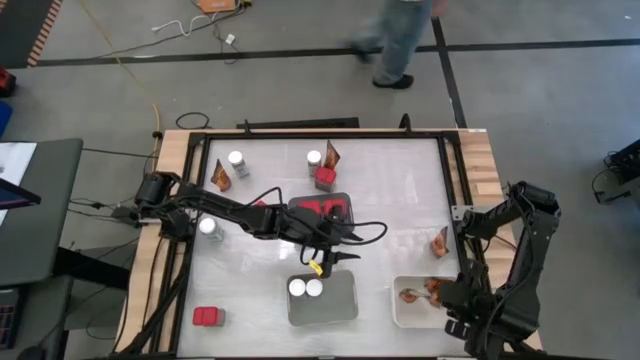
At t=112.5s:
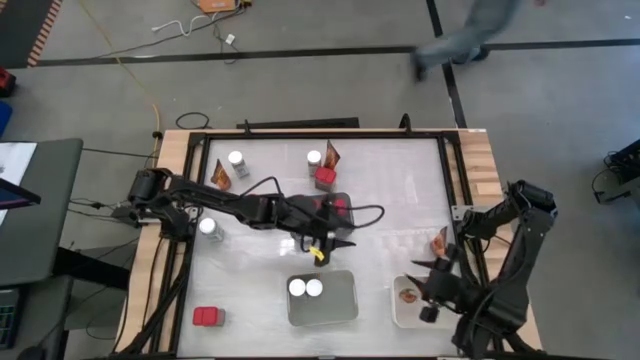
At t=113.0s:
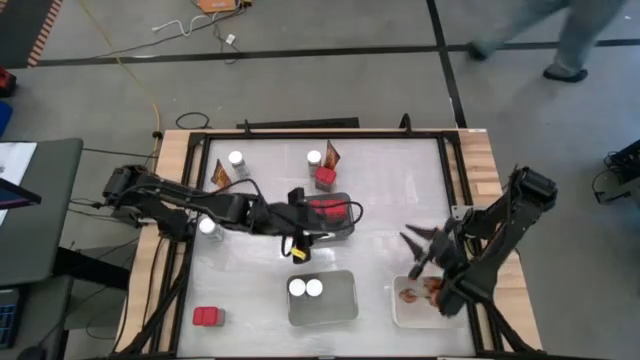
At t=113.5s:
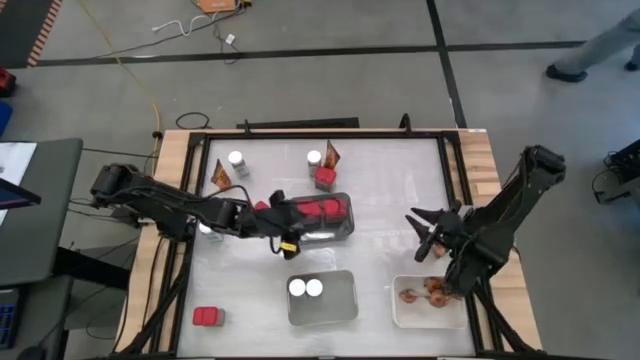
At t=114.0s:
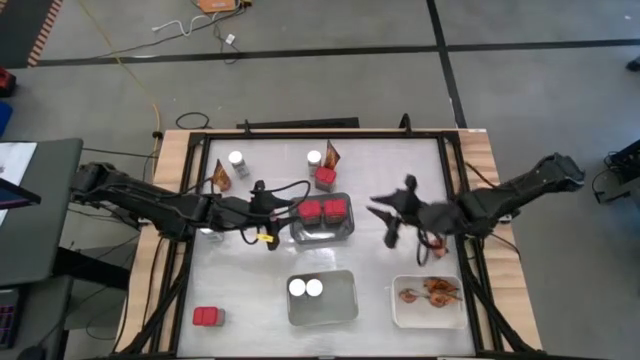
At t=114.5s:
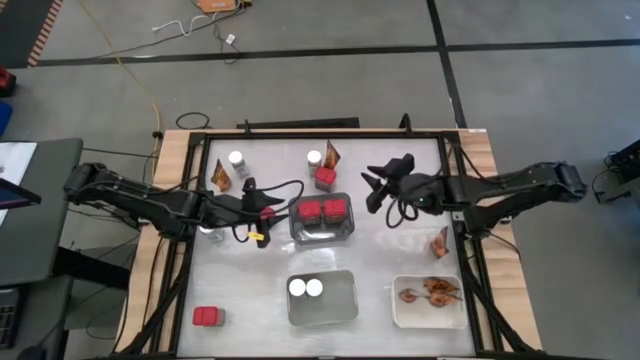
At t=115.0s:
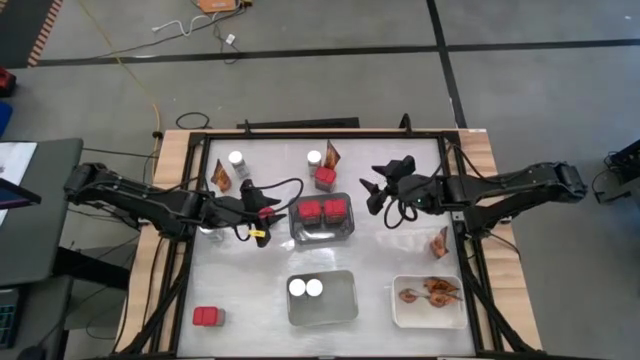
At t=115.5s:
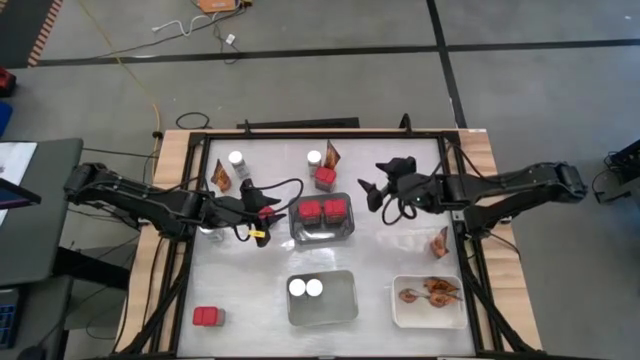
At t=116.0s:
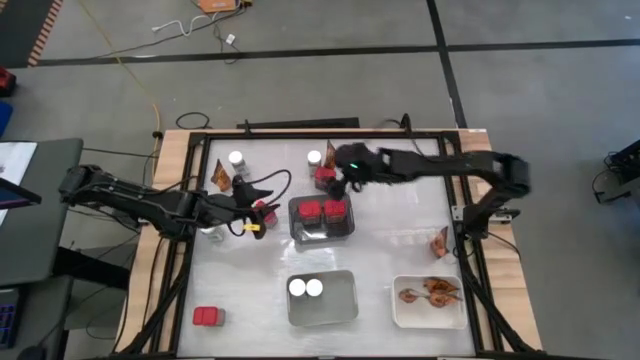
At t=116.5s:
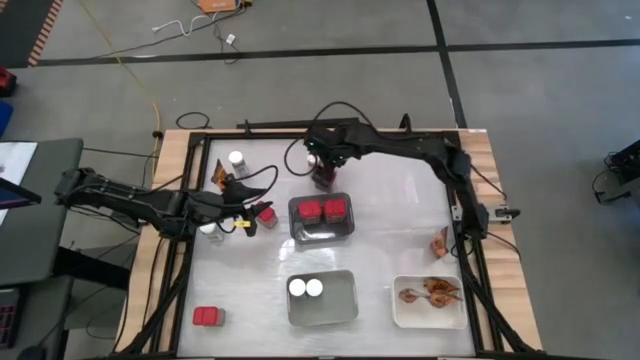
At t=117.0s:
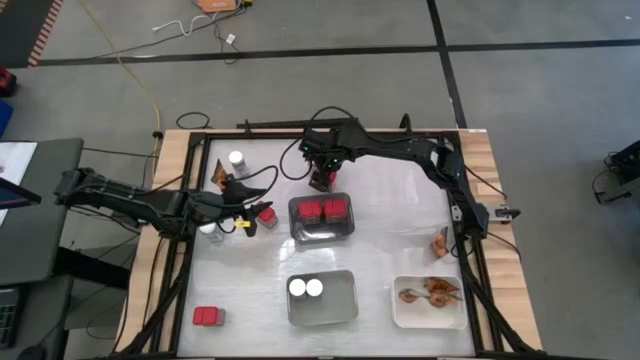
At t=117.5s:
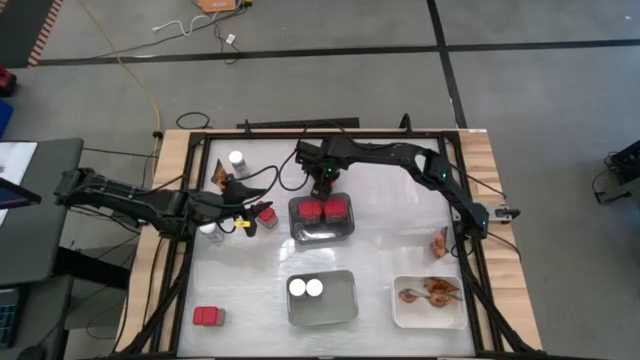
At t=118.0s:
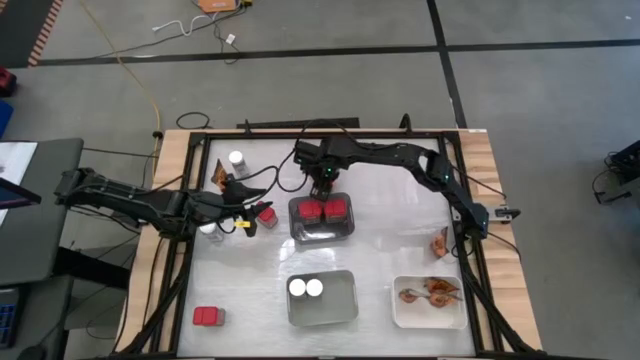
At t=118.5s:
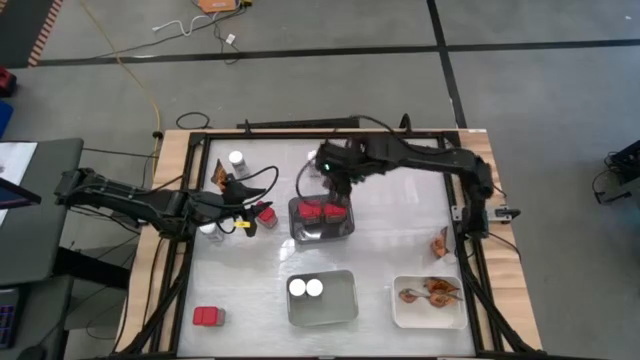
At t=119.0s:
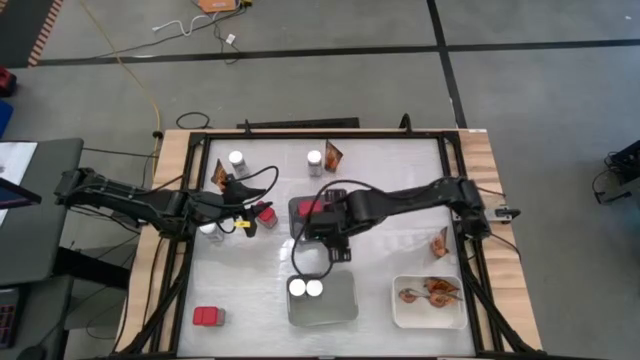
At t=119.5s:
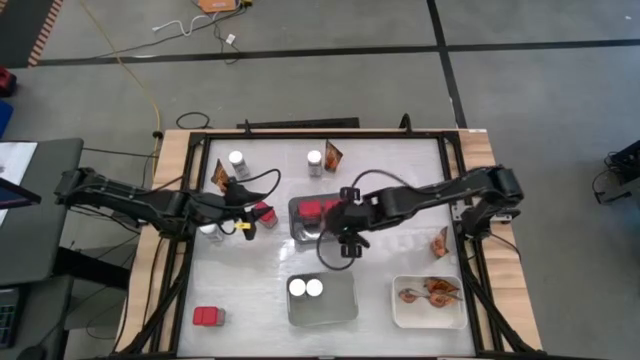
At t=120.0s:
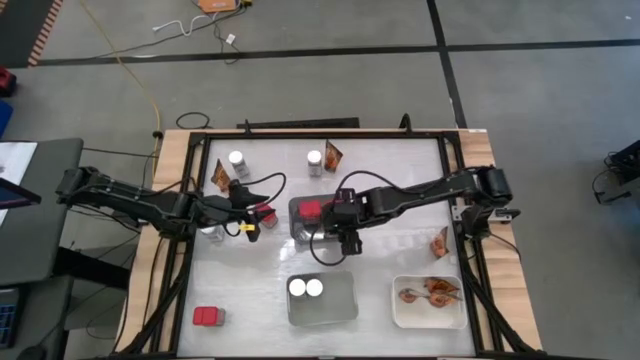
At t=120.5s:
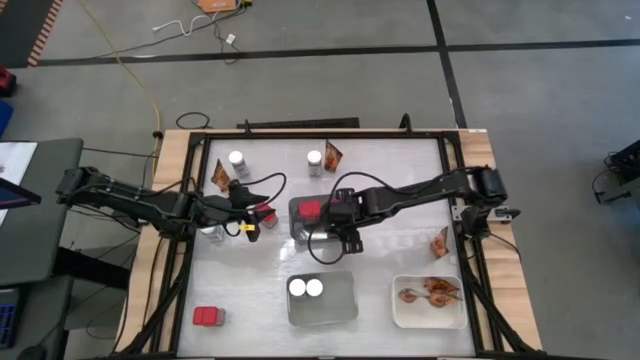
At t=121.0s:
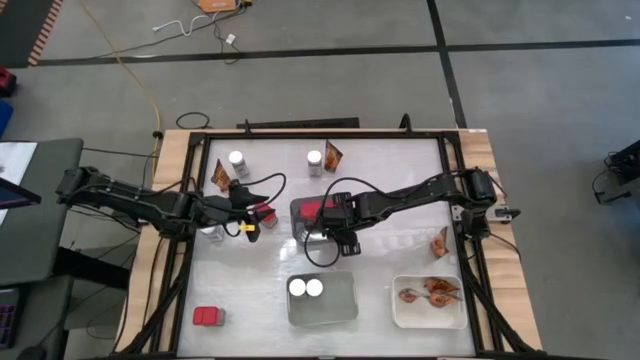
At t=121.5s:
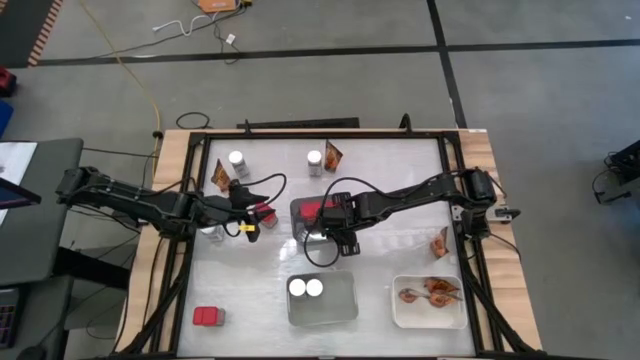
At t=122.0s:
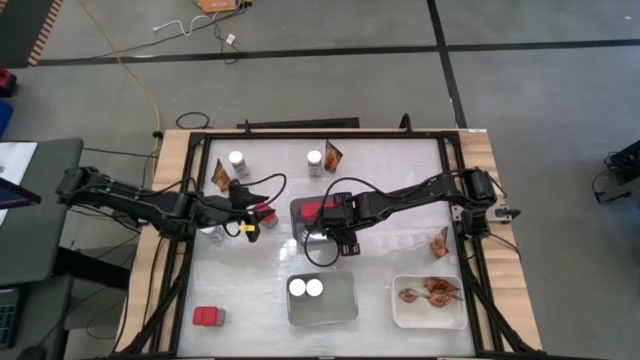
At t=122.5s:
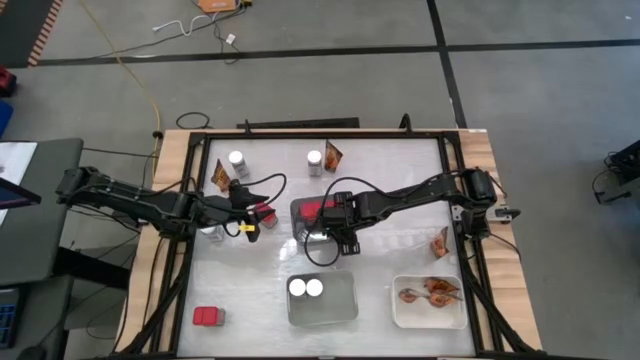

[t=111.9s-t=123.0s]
Task: Sort spices by type
Put the red seasoning can into the black bin

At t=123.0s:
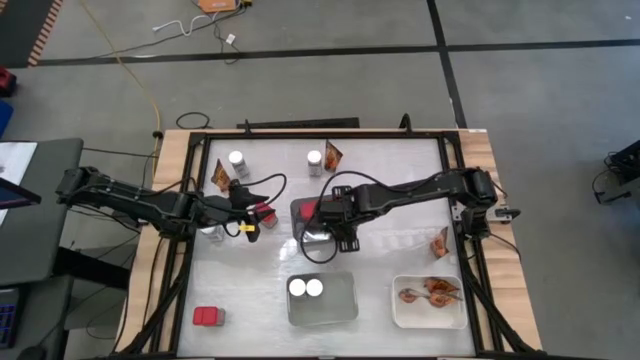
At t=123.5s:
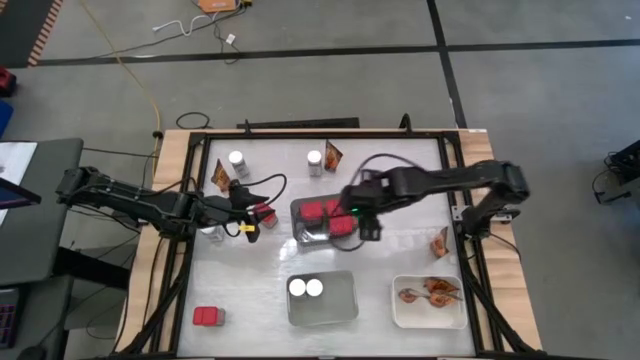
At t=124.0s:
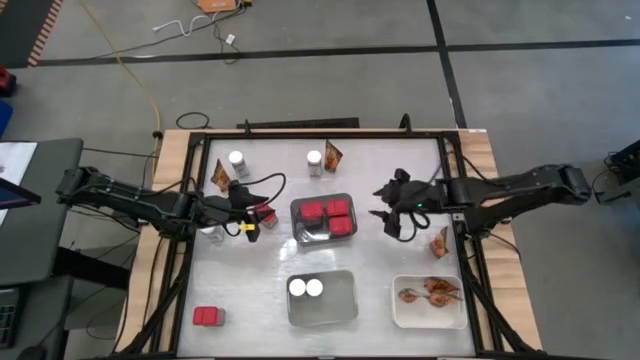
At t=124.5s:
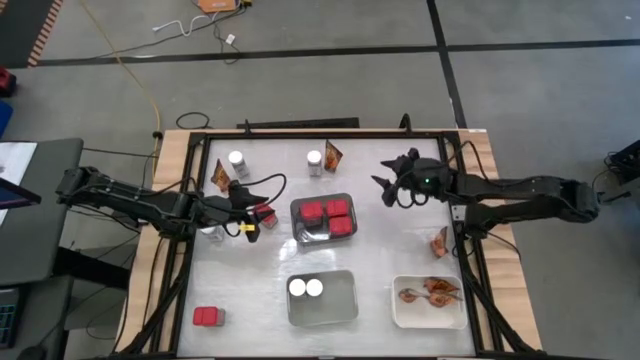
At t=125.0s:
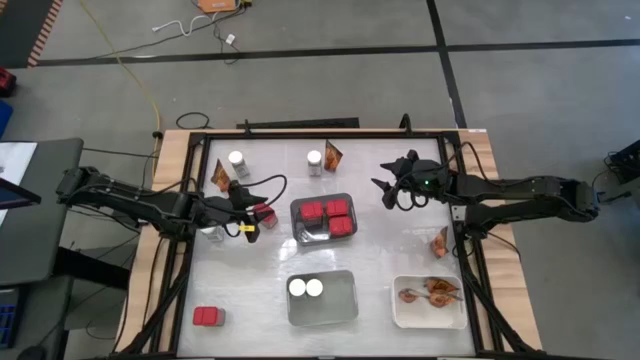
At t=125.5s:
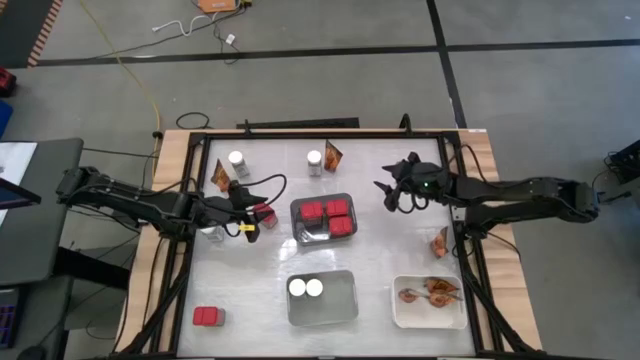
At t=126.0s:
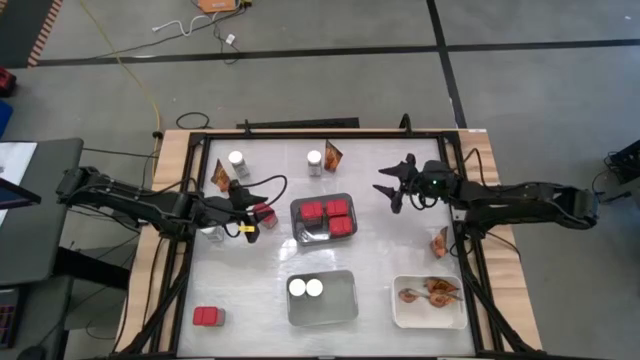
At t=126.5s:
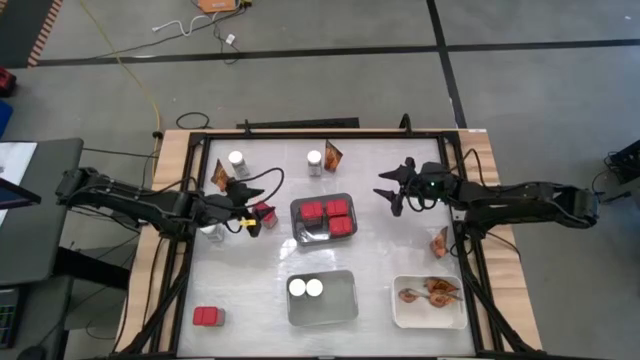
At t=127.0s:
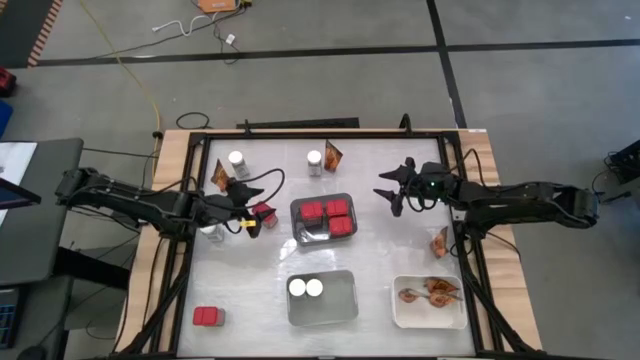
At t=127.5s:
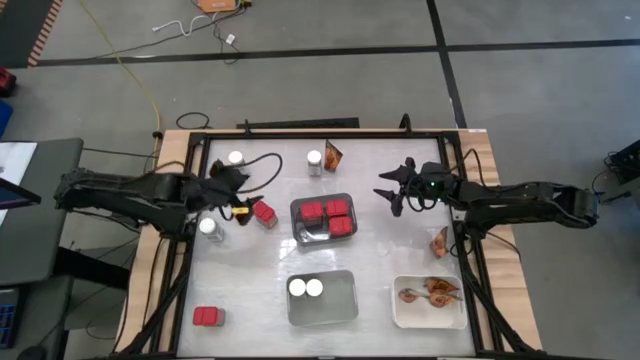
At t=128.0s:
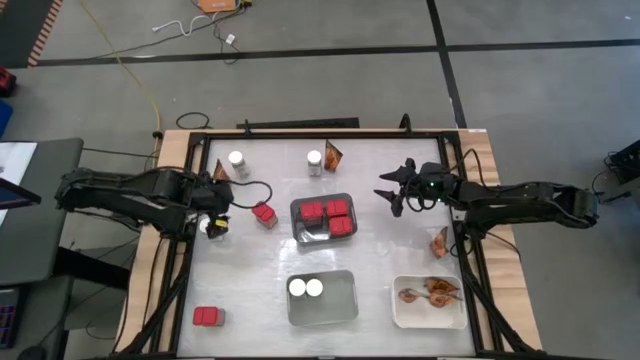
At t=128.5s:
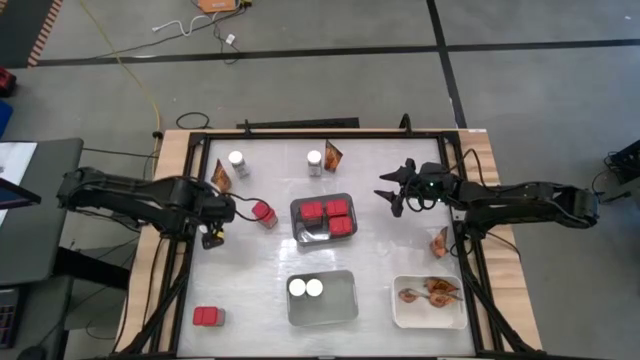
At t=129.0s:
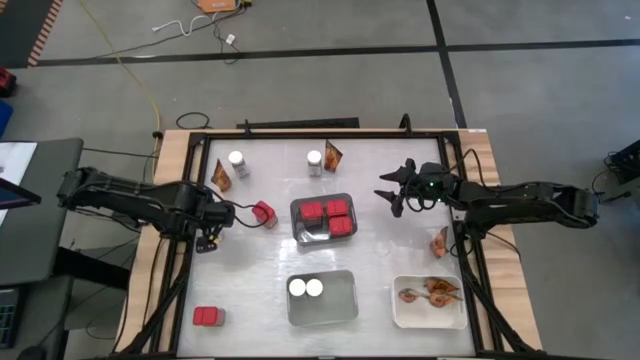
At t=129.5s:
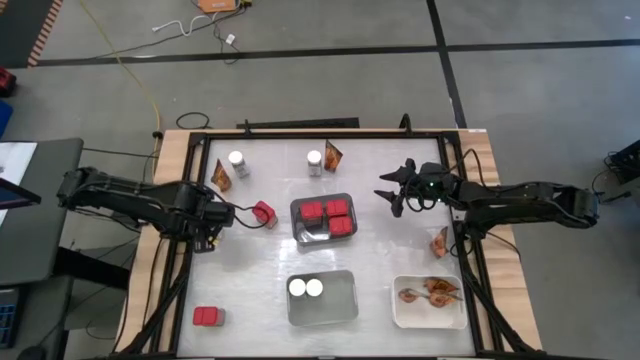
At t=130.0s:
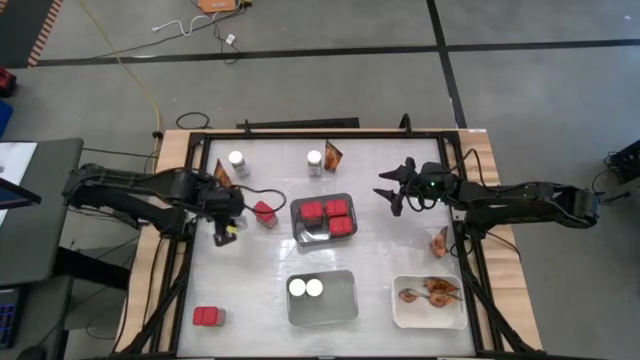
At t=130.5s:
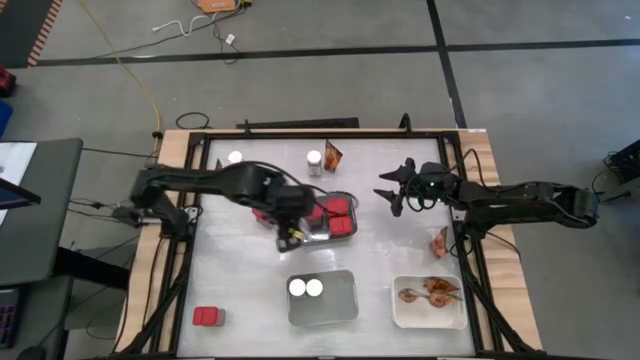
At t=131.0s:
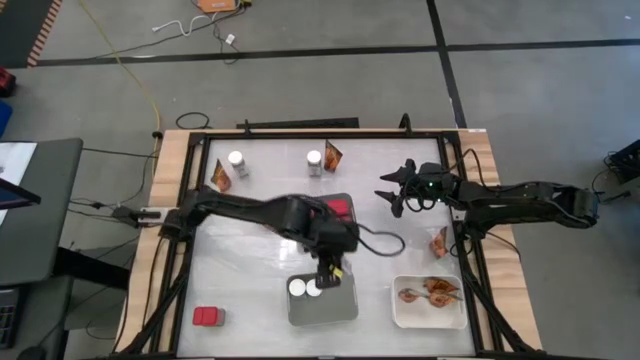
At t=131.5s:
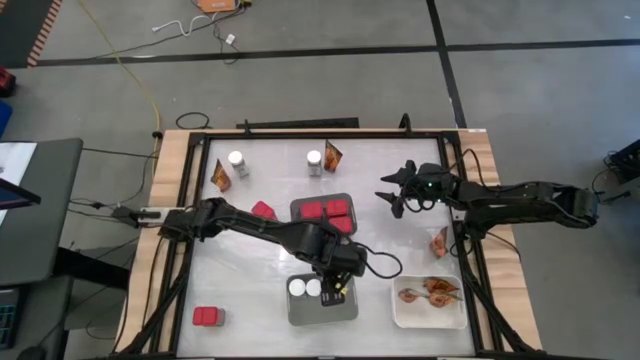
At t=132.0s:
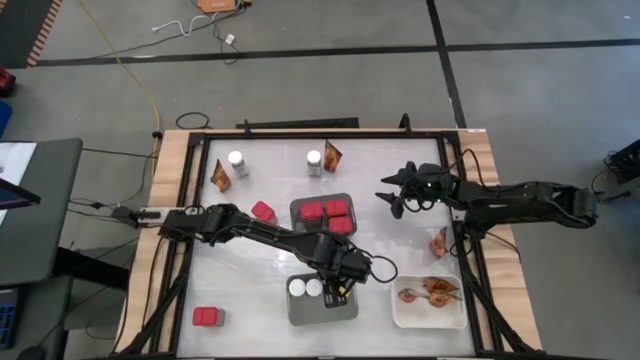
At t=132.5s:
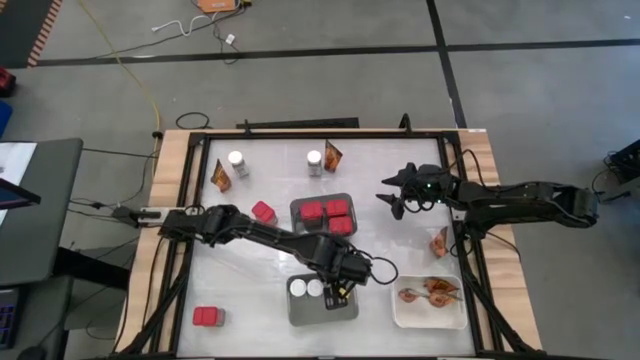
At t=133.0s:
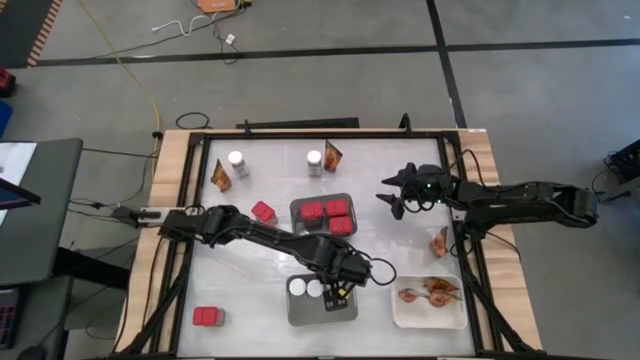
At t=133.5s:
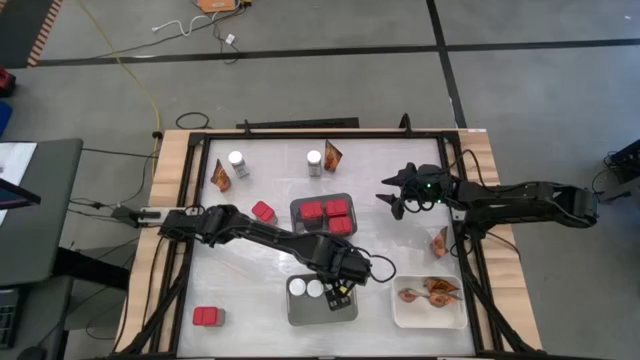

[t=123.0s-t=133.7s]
Put the white seasoning bottle into the gray bin
